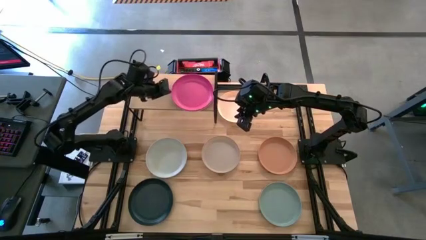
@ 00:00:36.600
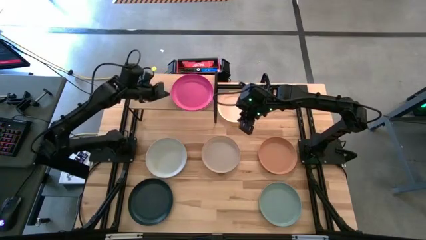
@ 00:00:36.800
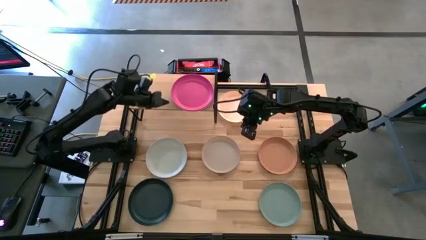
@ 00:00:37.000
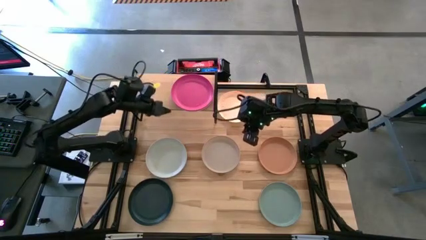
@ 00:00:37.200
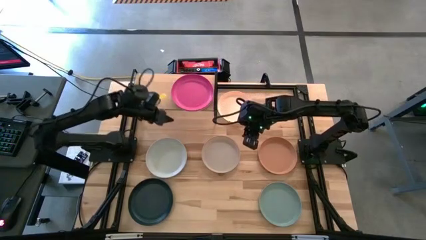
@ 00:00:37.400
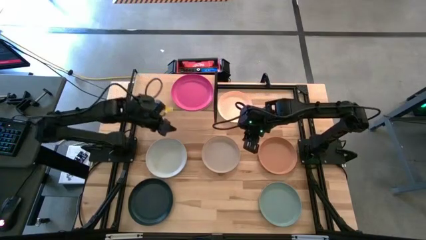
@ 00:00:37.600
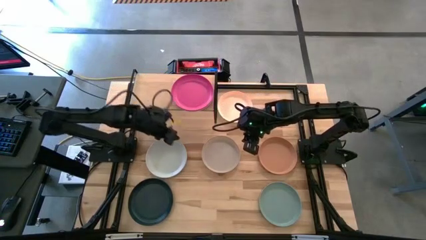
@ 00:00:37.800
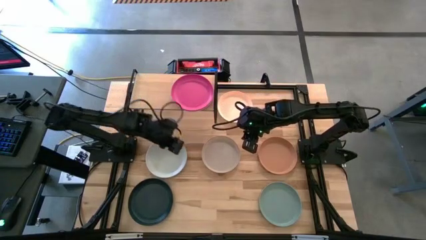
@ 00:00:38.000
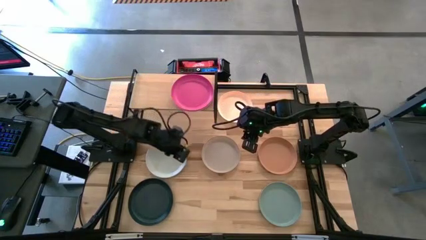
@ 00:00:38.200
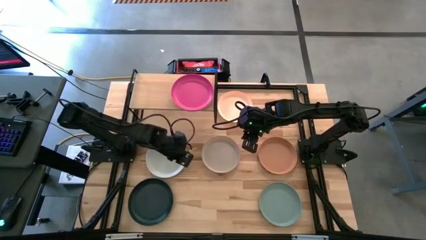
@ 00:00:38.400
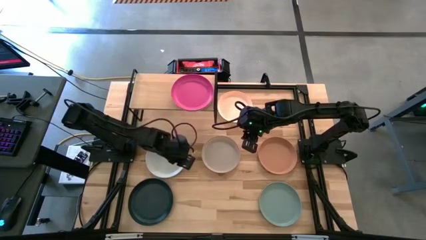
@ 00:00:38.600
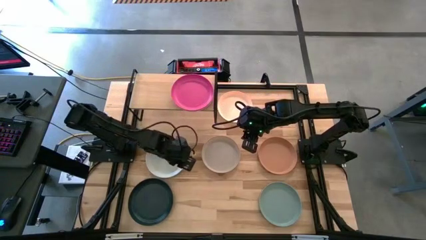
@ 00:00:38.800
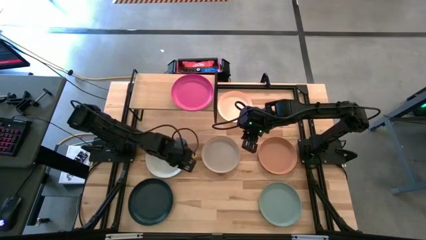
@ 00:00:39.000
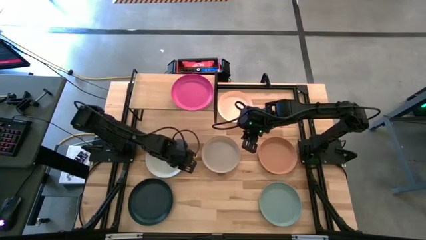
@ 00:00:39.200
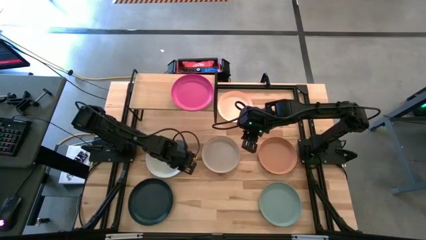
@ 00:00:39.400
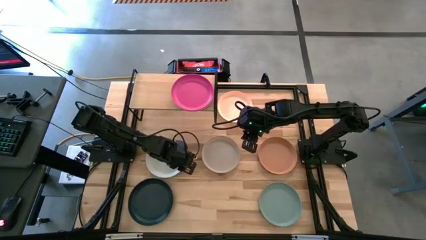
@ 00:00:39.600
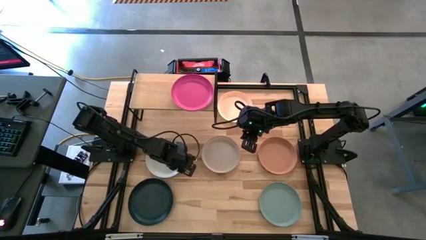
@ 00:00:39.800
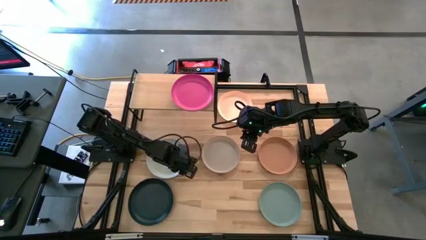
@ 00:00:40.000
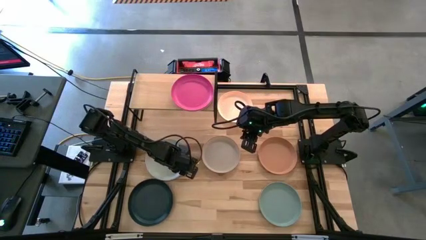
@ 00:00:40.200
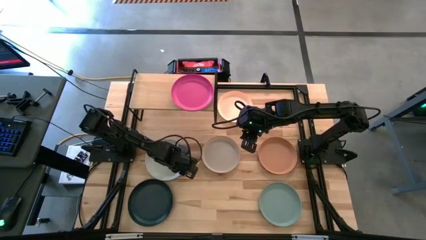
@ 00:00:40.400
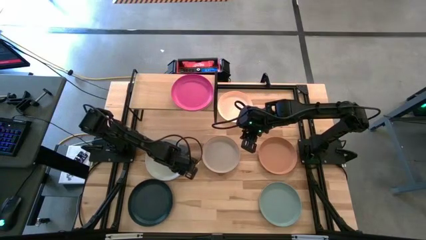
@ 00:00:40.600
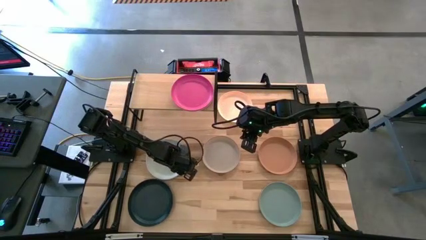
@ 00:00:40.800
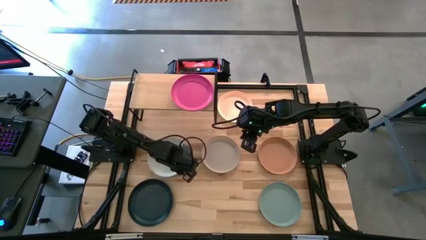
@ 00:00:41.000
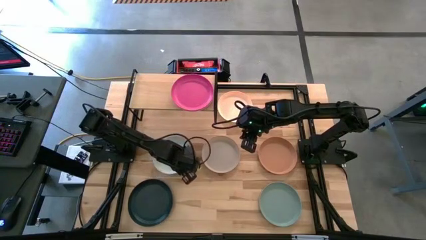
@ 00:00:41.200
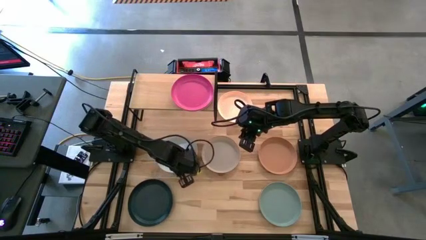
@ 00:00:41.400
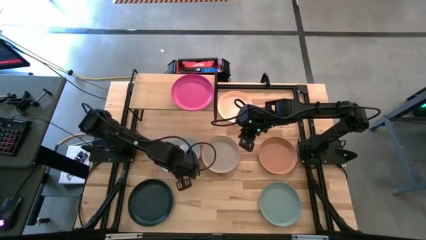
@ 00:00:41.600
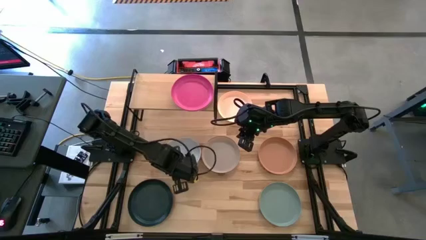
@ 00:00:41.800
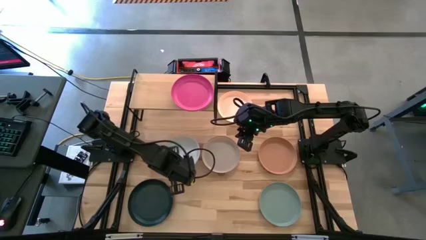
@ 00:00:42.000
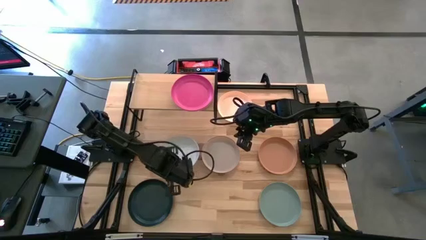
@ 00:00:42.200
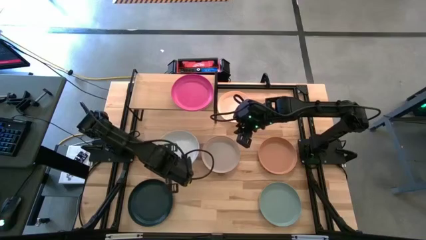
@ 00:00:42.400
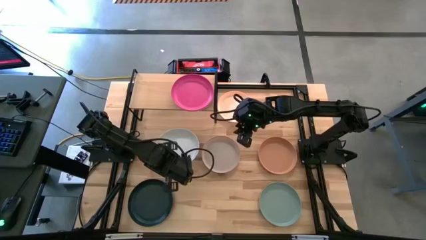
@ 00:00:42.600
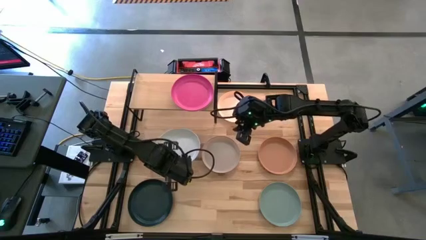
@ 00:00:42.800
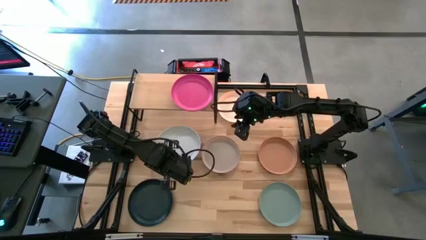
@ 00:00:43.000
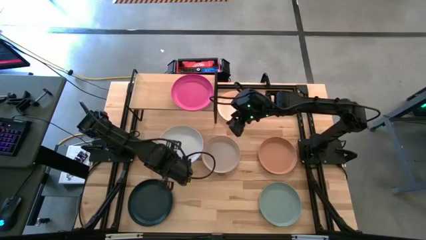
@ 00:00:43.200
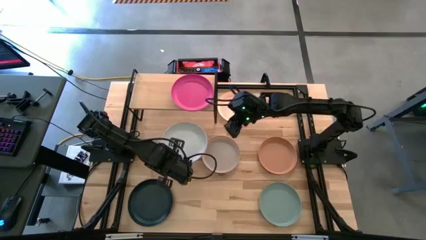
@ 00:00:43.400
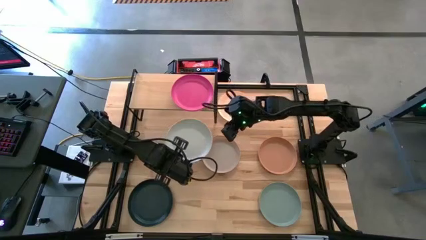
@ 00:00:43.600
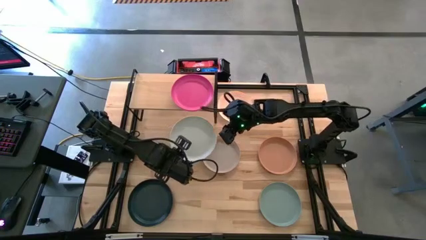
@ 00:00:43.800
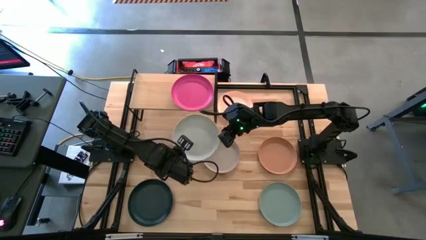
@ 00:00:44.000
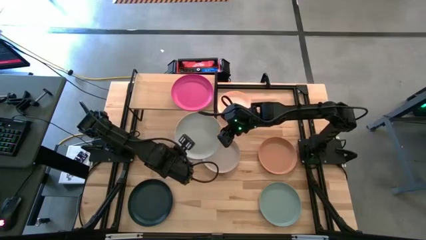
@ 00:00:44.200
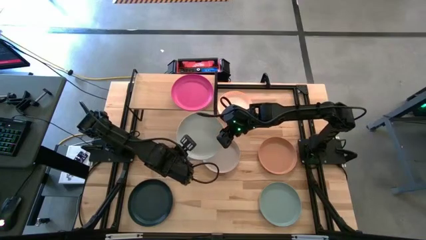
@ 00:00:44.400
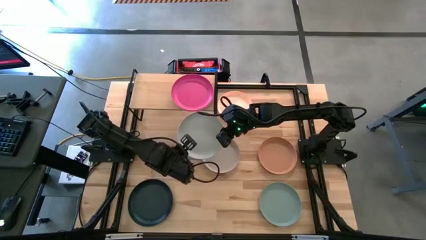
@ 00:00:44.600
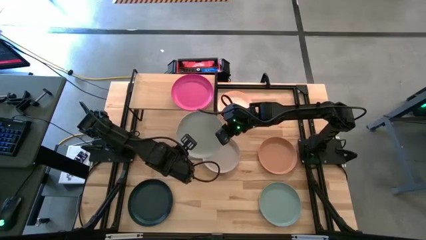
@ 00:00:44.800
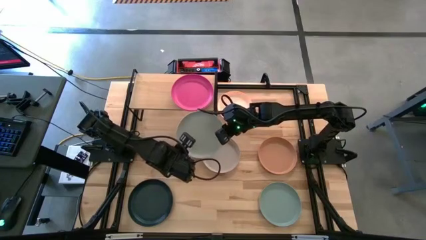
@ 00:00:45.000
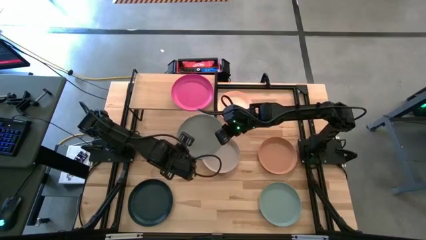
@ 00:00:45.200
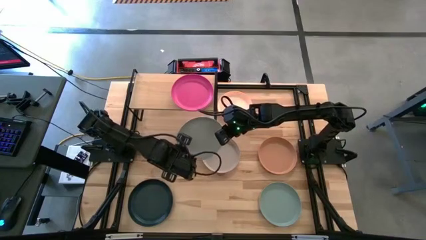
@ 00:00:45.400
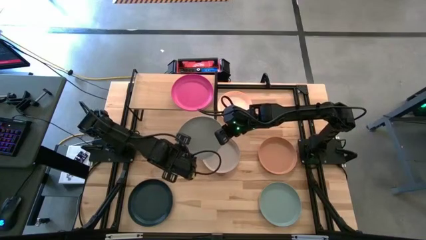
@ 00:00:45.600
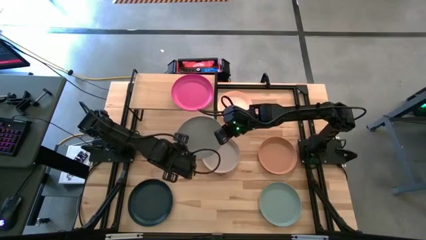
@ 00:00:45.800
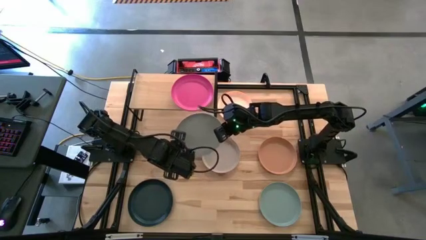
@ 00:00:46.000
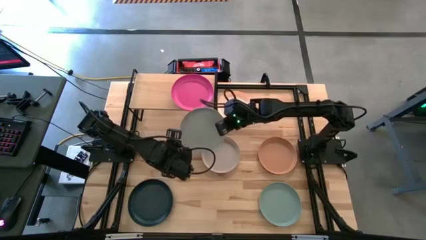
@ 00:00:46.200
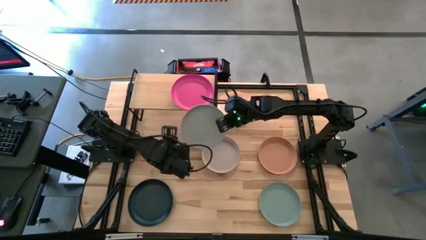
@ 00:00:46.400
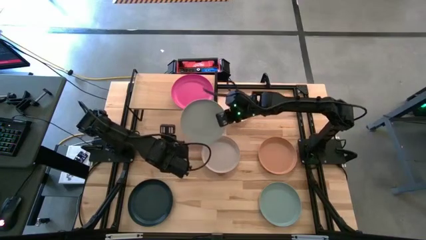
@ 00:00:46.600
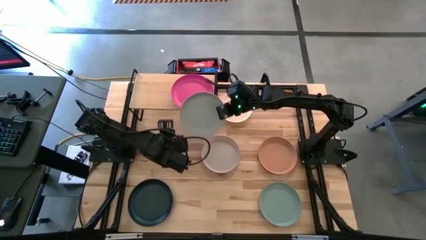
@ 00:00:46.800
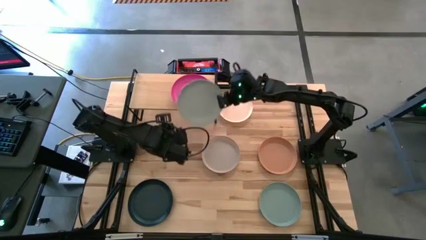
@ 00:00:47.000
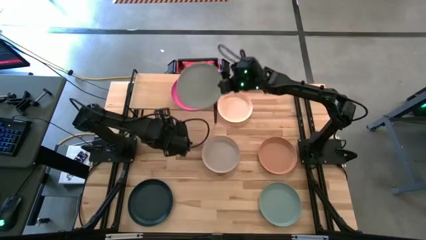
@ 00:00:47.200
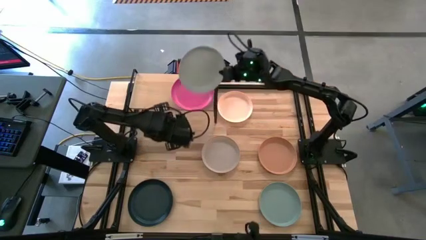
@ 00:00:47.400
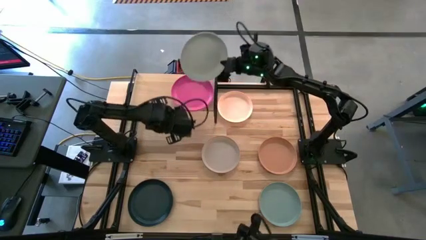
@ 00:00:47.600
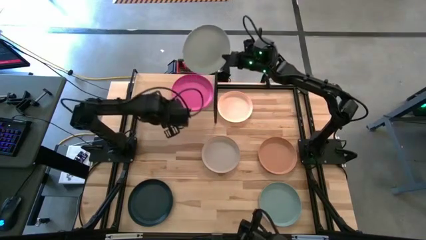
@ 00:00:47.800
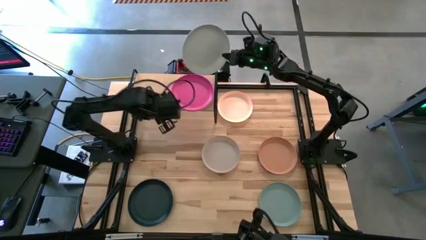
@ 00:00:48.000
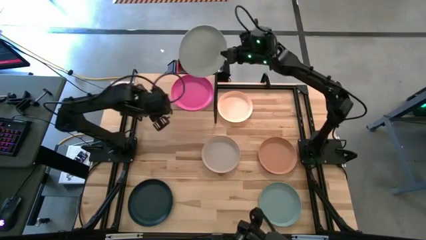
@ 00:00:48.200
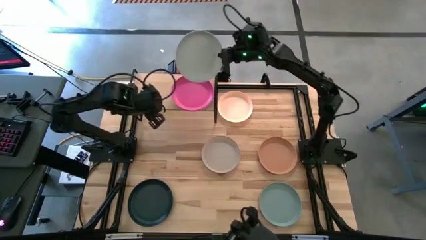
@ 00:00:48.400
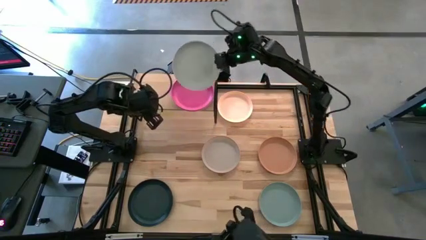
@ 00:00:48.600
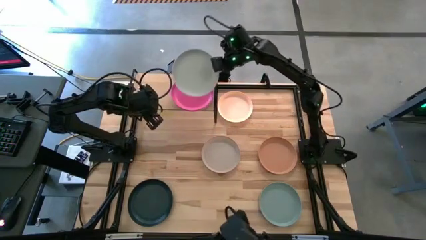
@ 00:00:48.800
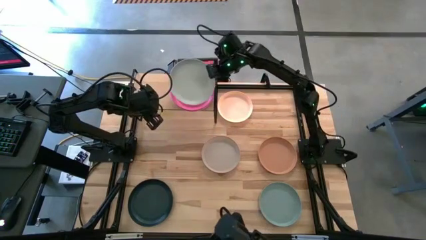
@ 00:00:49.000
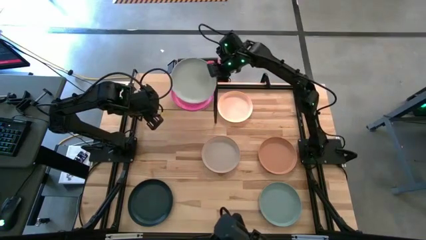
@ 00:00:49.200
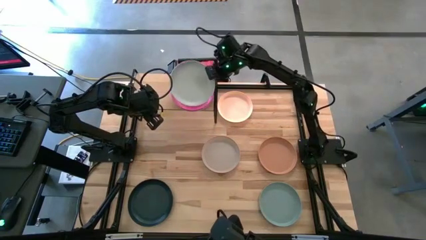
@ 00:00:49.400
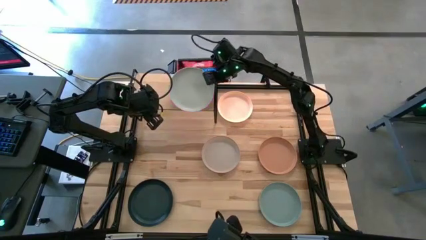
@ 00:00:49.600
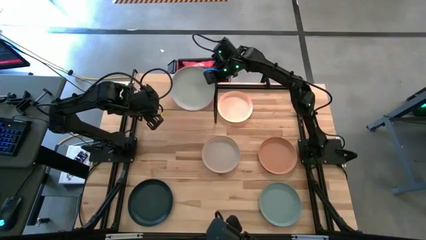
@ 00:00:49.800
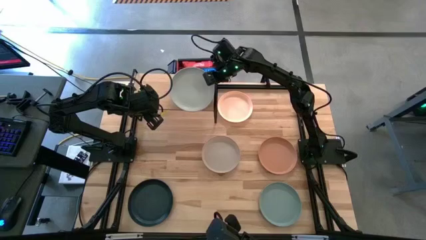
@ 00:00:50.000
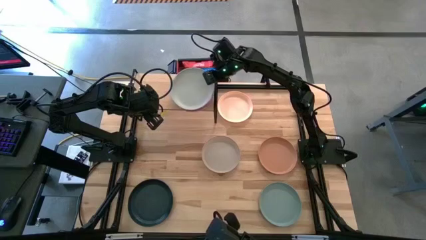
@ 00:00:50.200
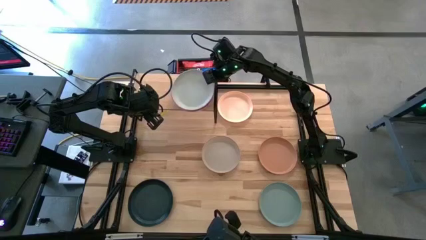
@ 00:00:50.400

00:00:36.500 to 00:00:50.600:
Task: Place and stack plates onto a shelf
Stack the left white plate on top of the pink plate on the shelf
